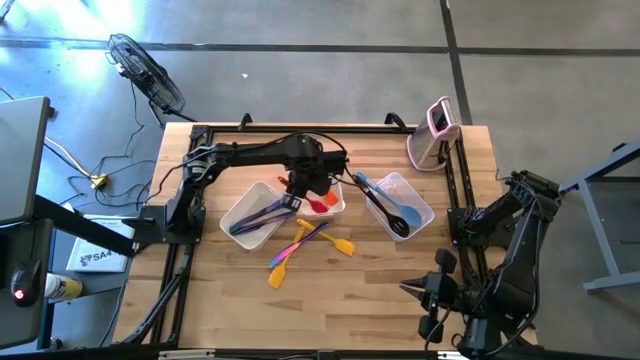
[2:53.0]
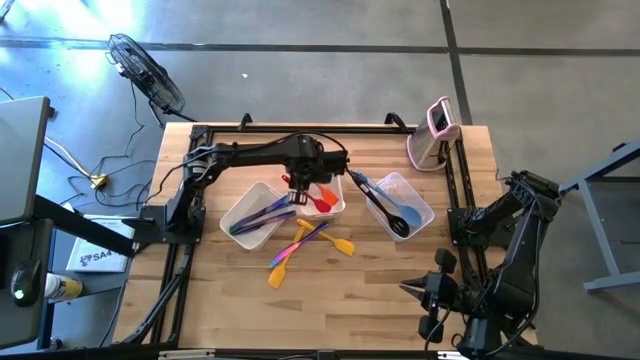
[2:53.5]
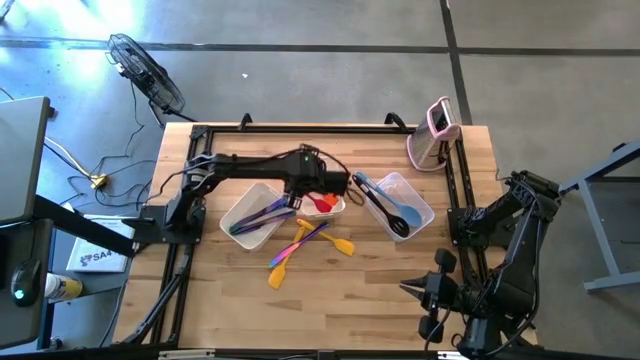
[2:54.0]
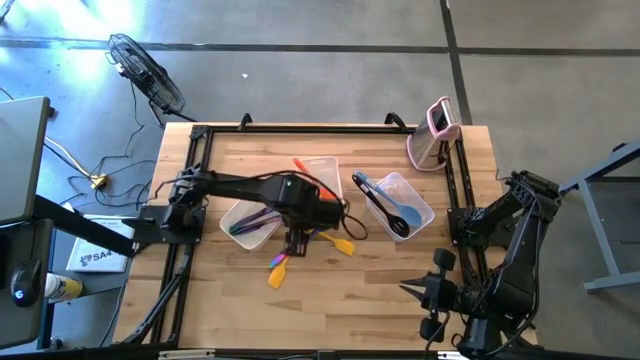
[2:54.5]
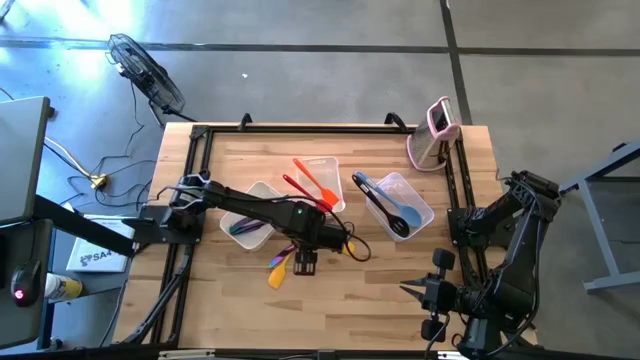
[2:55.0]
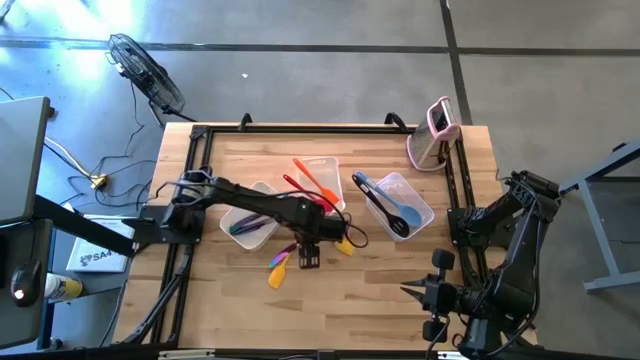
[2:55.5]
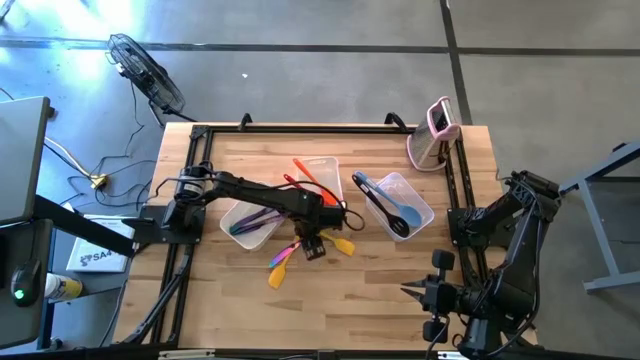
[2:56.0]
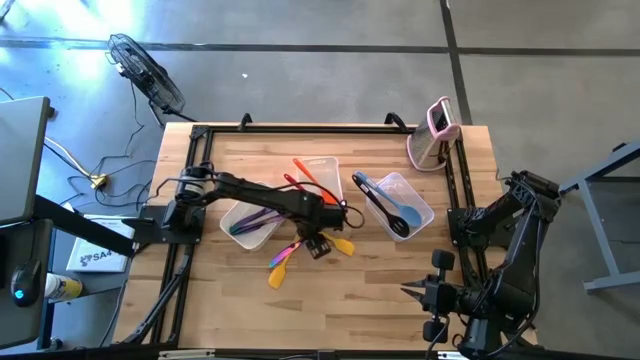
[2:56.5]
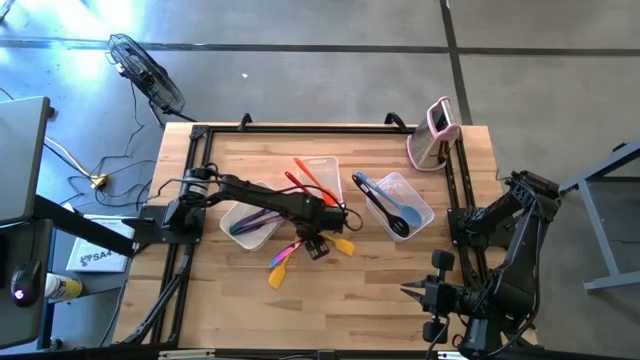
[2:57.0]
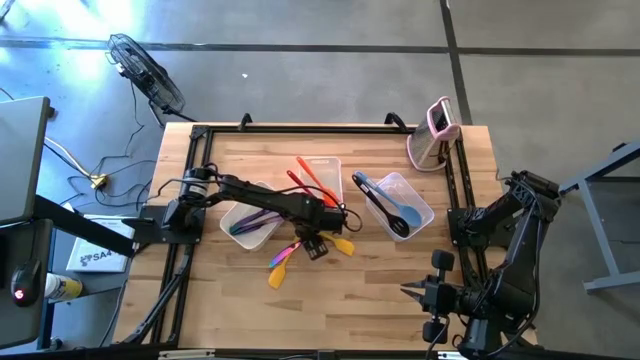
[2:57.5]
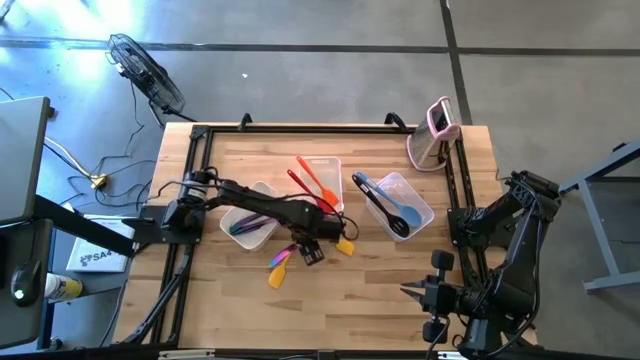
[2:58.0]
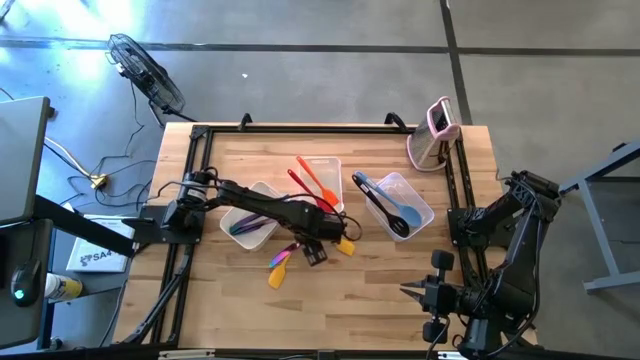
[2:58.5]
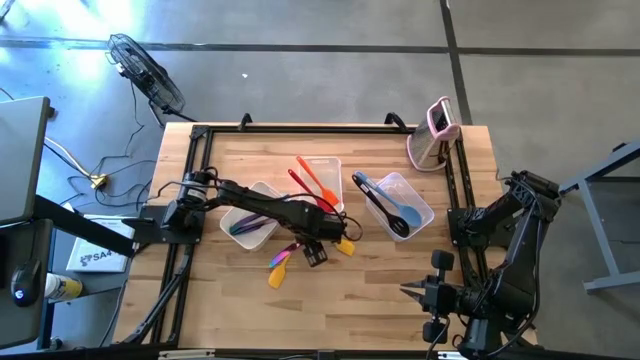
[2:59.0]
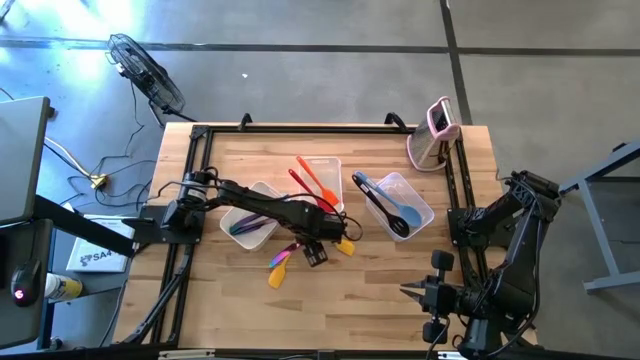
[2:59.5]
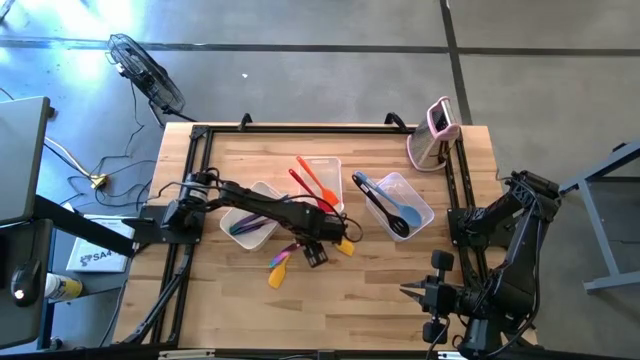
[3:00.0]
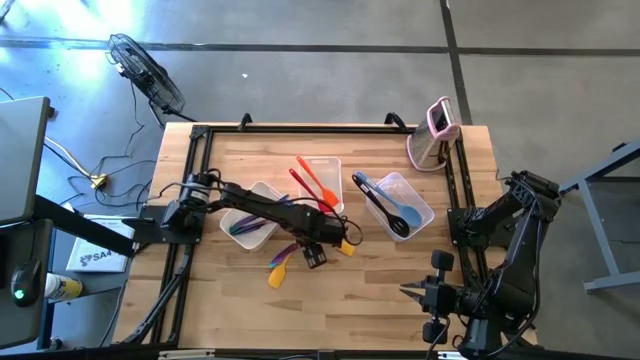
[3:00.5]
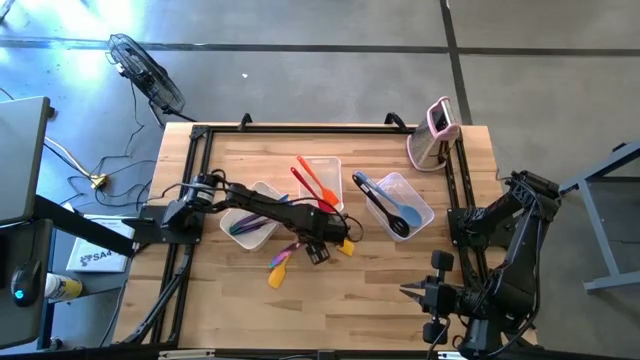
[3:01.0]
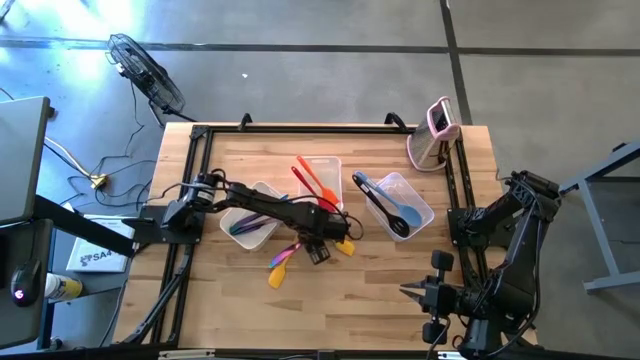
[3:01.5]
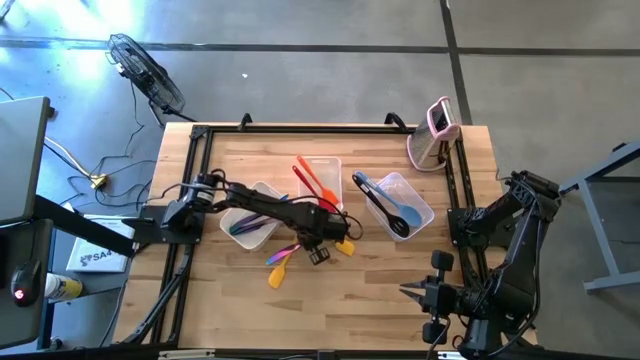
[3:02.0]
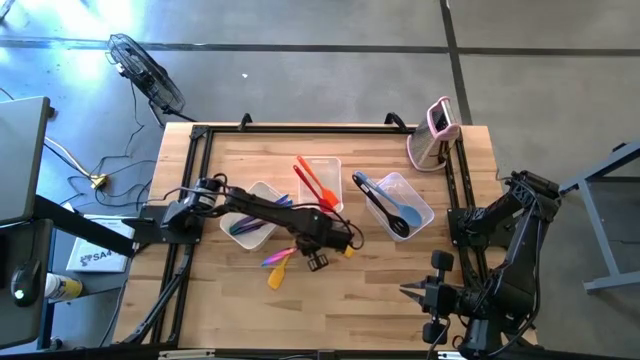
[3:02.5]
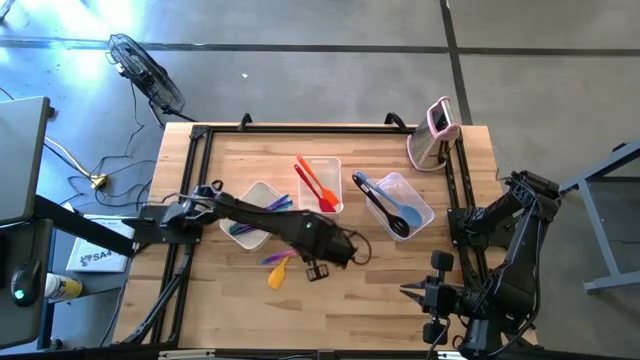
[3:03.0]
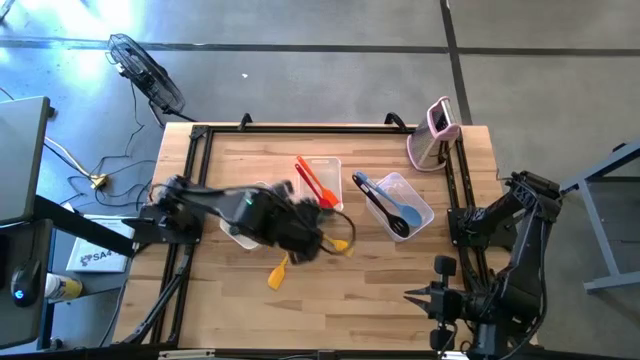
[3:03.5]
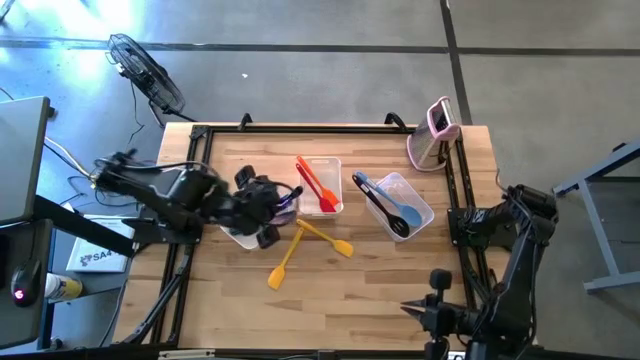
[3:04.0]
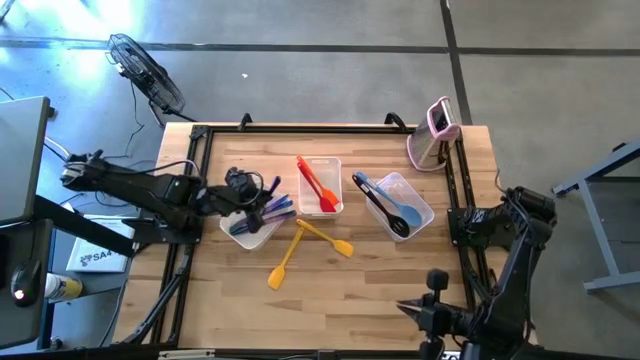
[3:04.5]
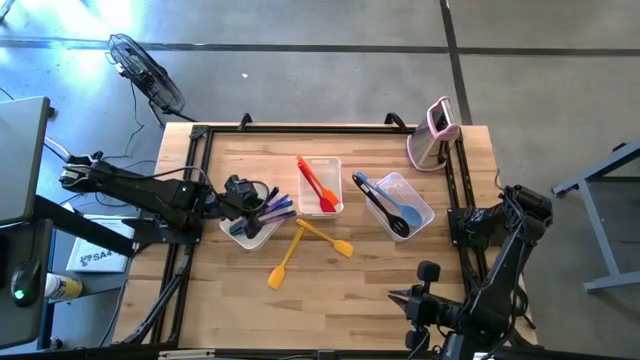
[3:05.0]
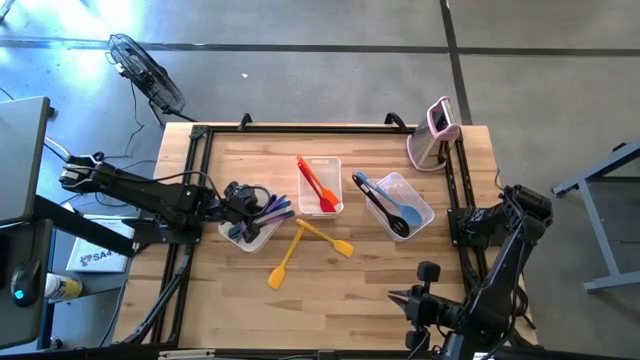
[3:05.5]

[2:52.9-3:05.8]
Task: Pick & Place Kitchen Items
Put the blue table knife into the left white bin

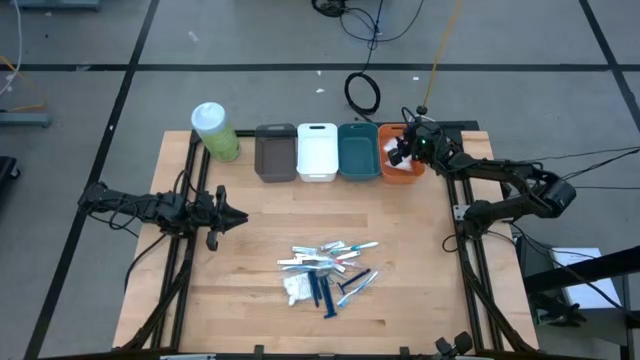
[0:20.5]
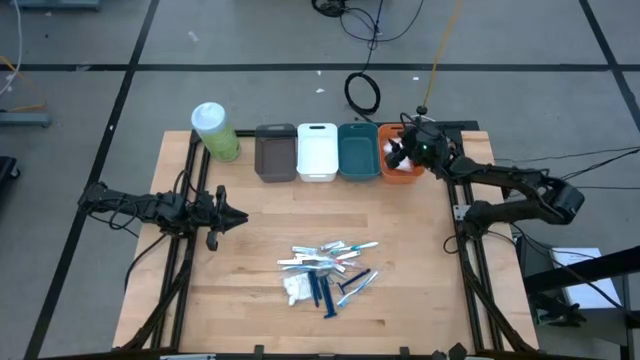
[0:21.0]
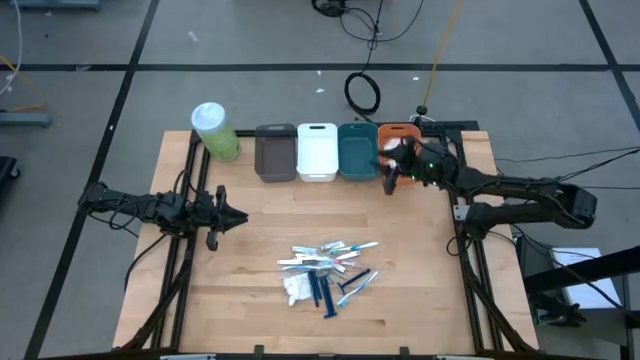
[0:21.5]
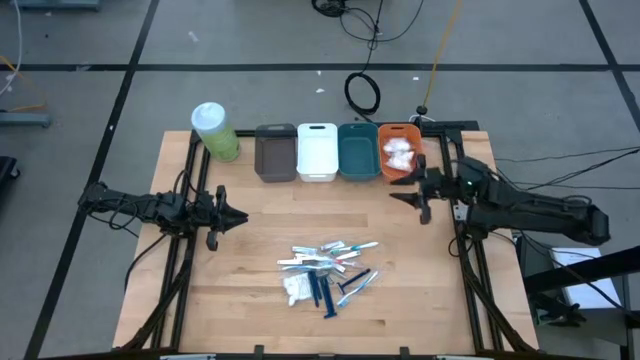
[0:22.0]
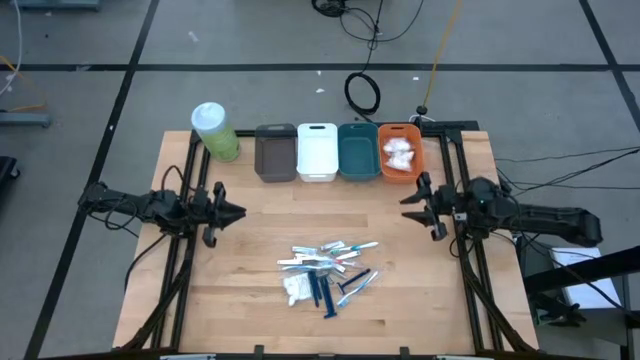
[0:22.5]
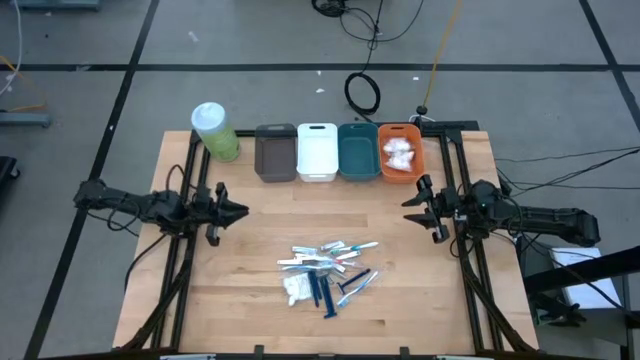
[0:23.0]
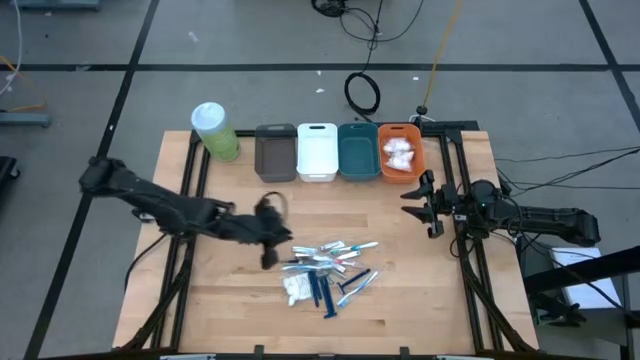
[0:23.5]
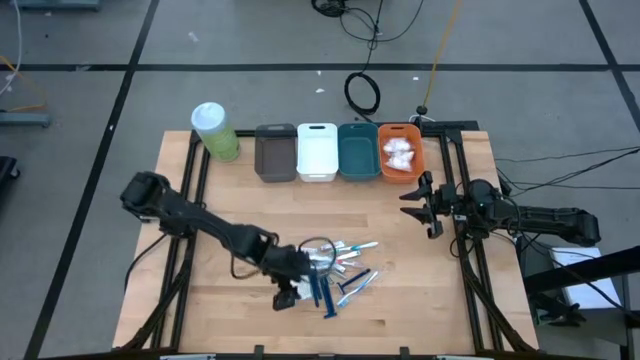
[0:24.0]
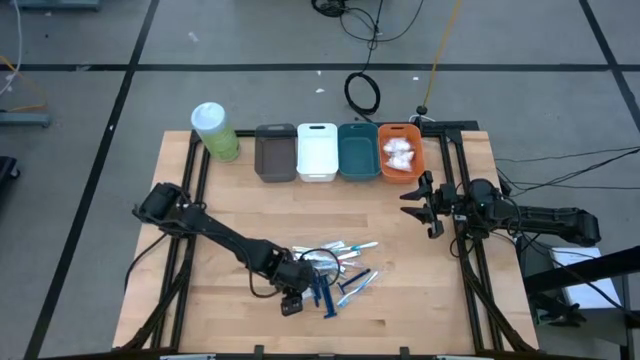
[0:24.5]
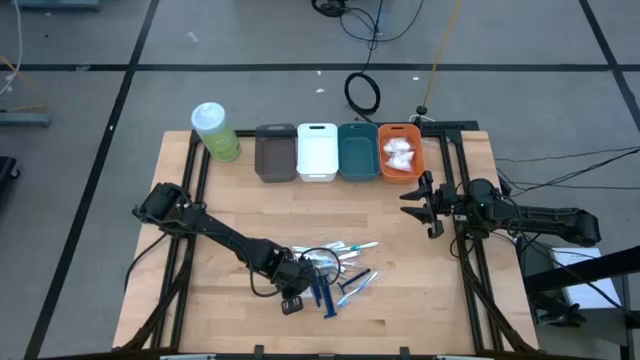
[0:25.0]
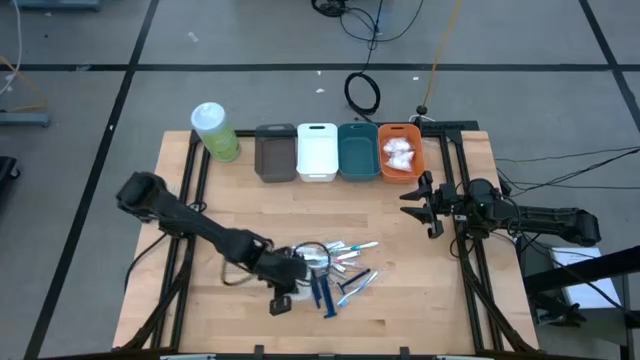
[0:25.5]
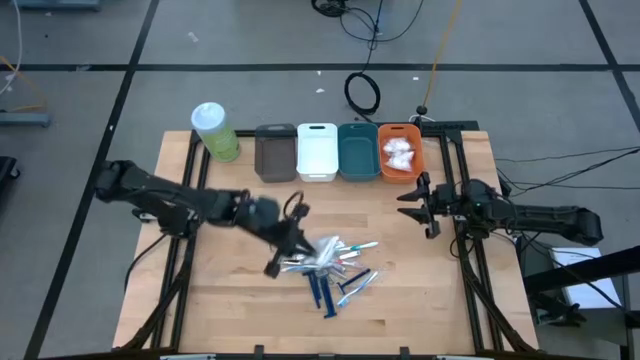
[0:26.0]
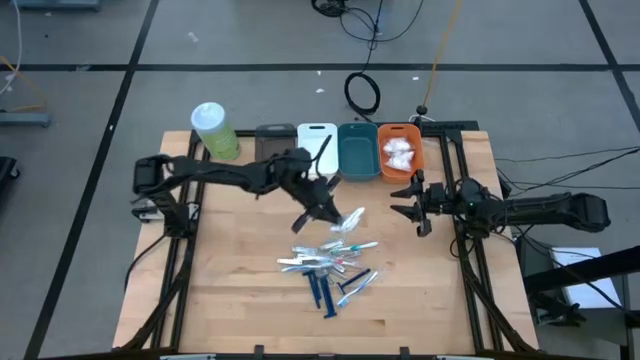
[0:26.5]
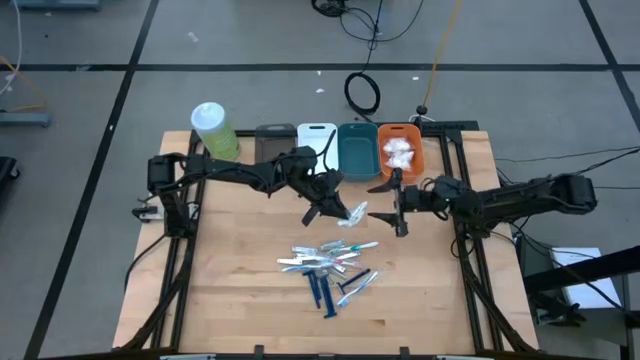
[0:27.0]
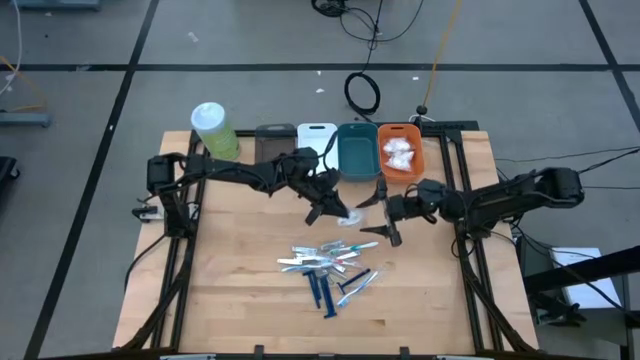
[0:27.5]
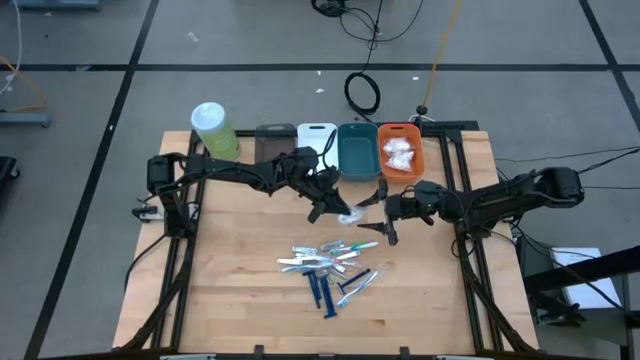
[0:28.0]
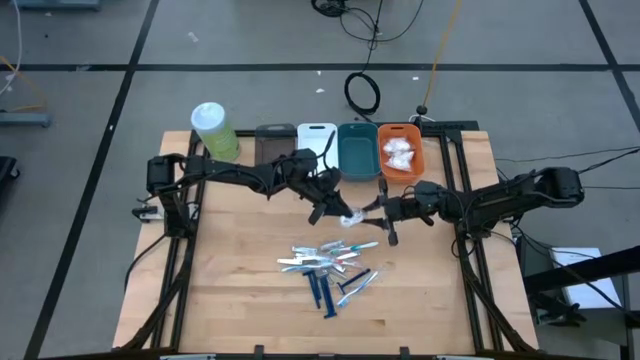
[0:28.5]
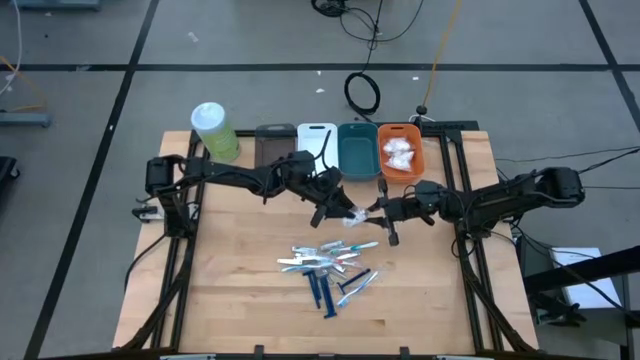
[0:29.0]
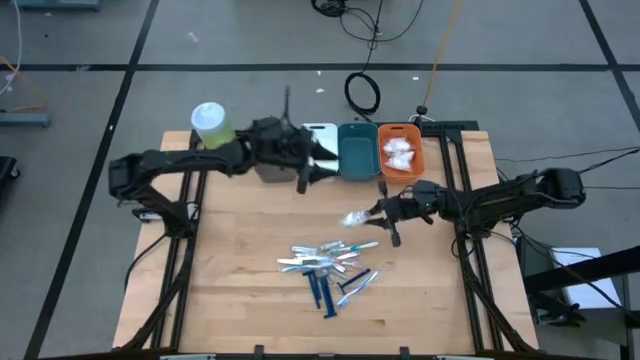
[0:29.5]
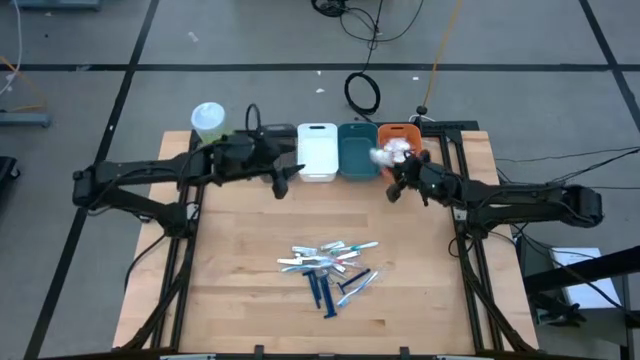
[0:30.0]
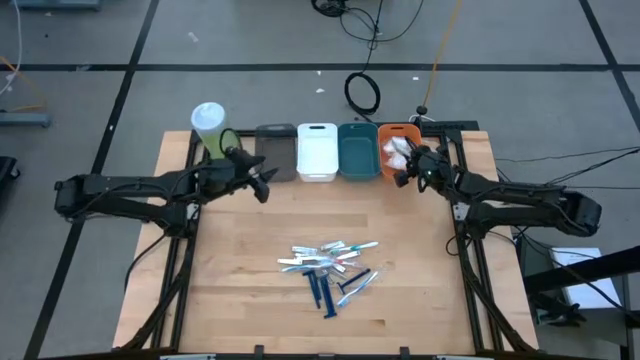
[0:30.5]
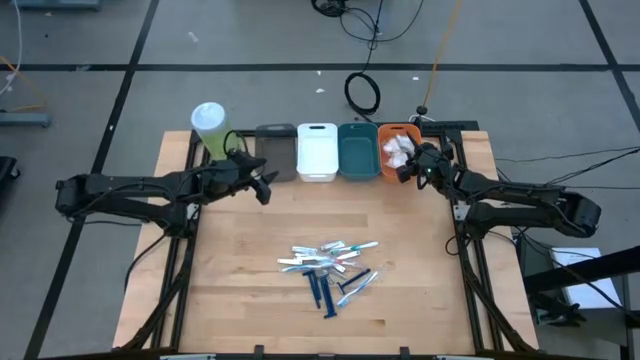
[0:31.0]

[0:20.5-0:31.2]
Task: Pick & Place Travel size toiletries
Put the white cotton pack into the orange bin
